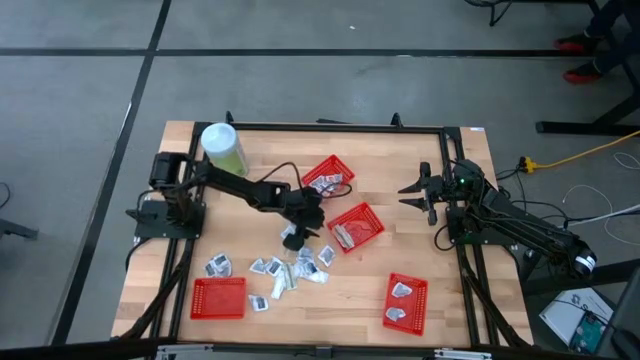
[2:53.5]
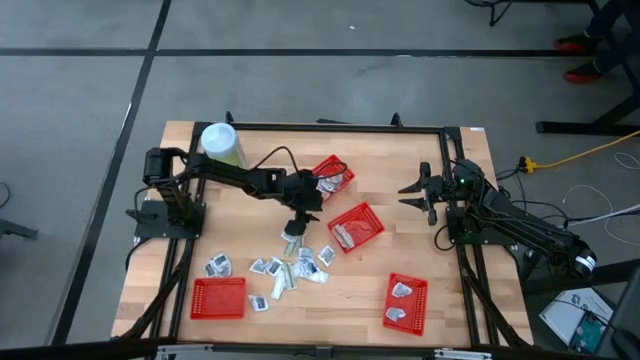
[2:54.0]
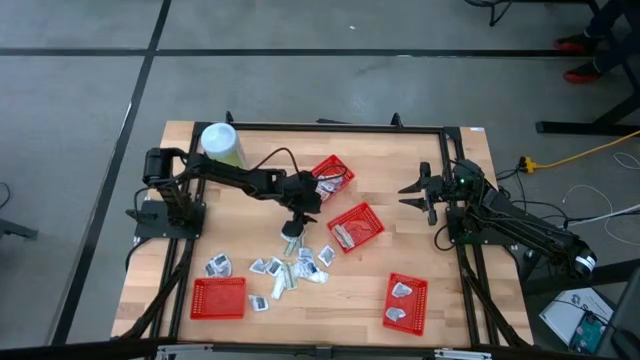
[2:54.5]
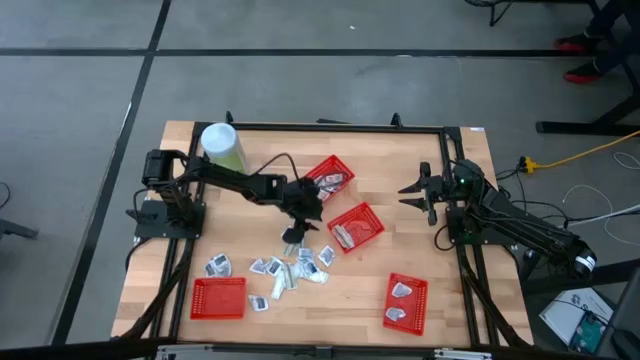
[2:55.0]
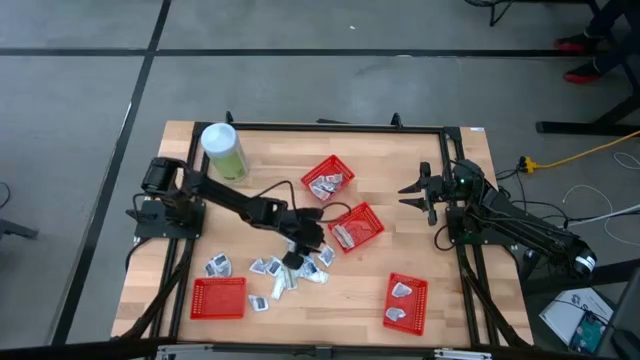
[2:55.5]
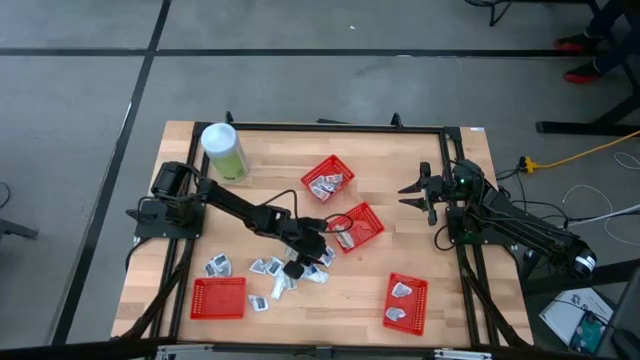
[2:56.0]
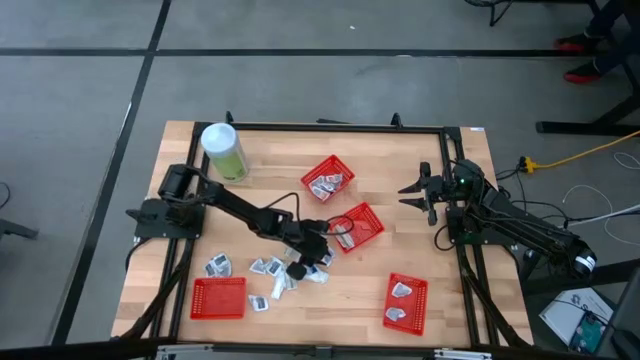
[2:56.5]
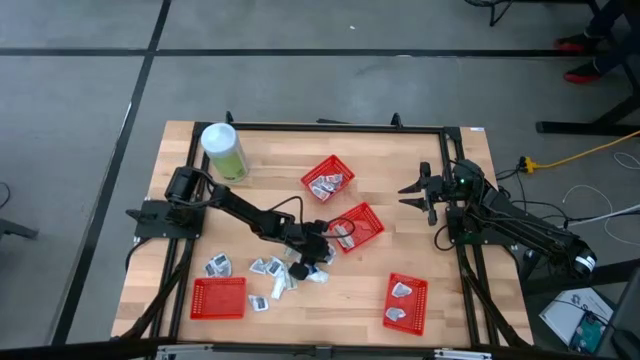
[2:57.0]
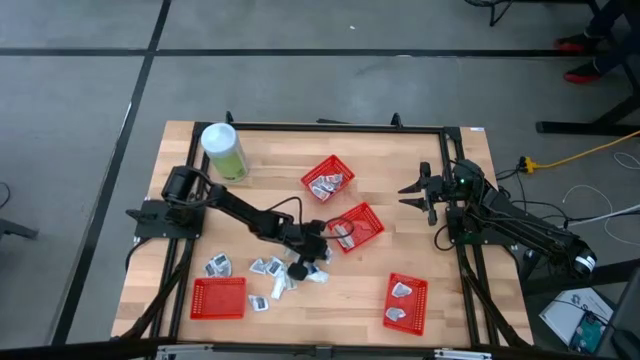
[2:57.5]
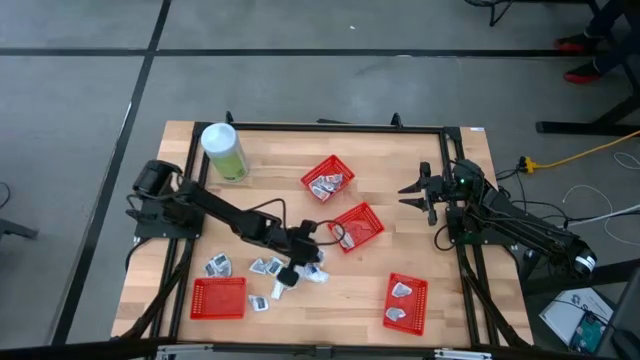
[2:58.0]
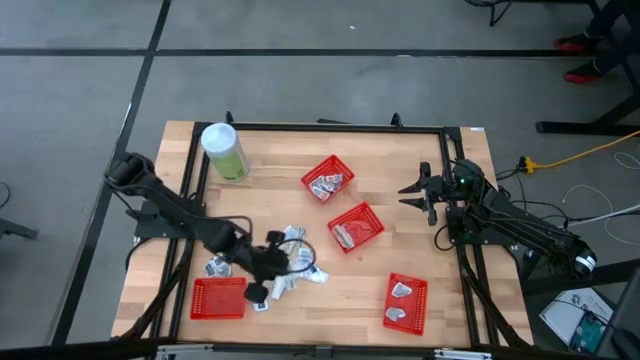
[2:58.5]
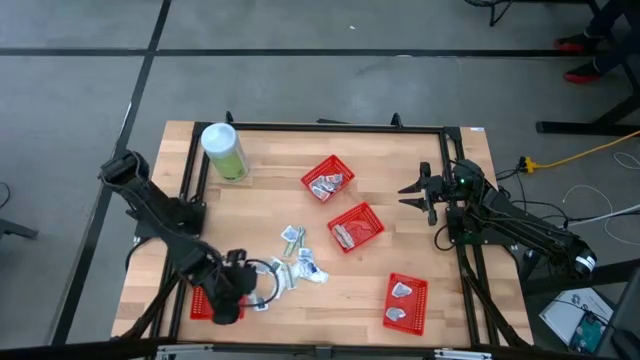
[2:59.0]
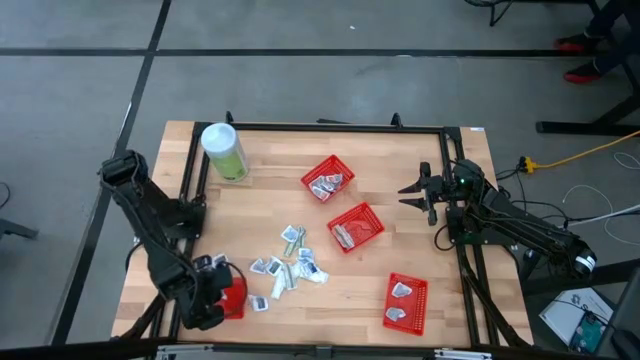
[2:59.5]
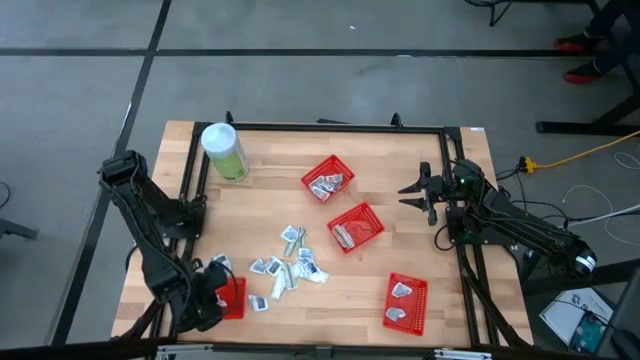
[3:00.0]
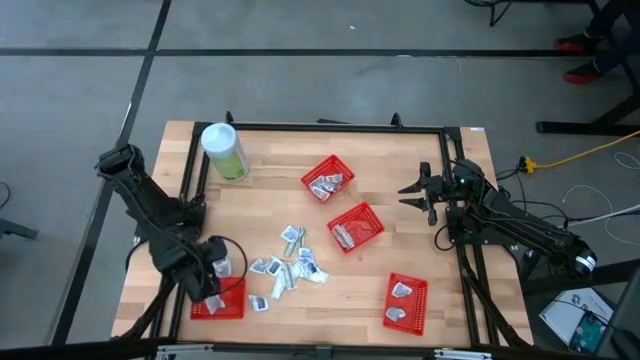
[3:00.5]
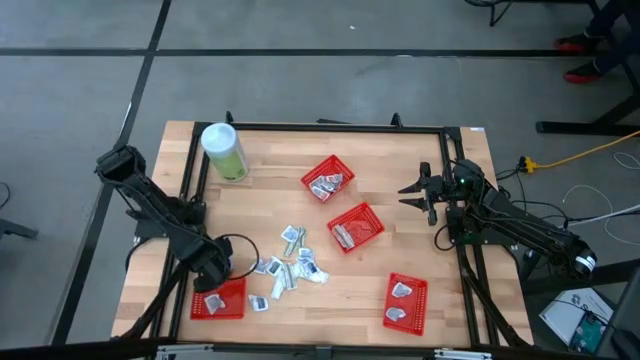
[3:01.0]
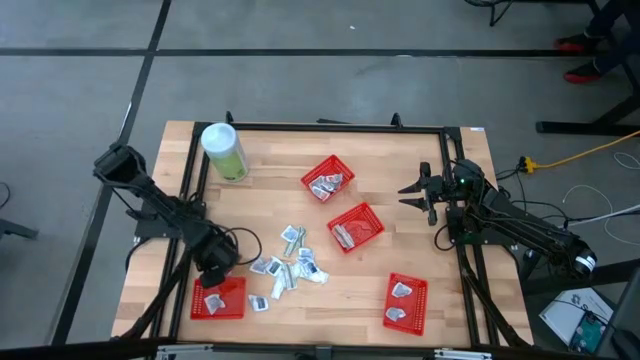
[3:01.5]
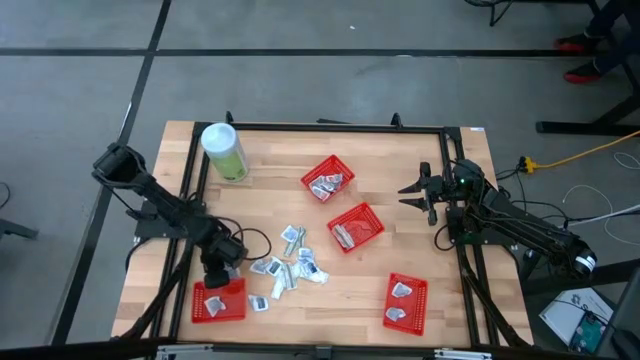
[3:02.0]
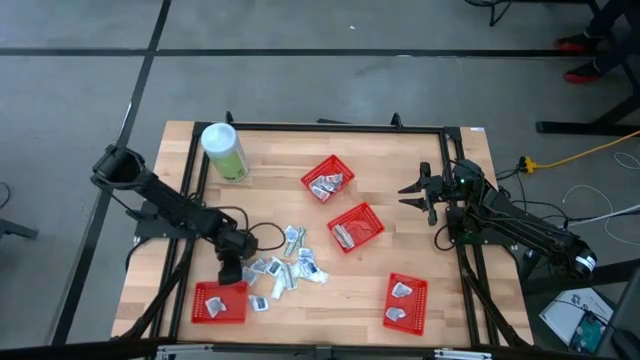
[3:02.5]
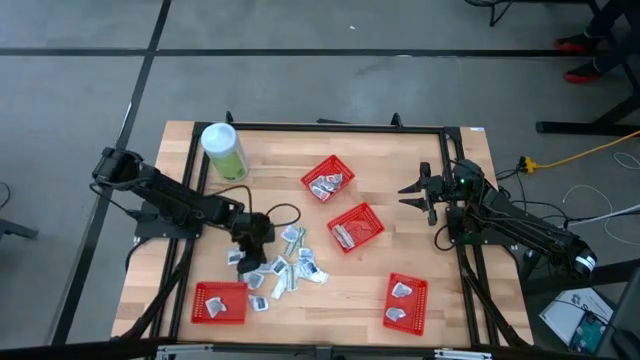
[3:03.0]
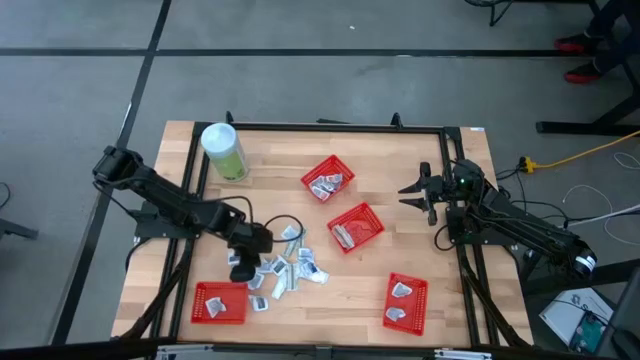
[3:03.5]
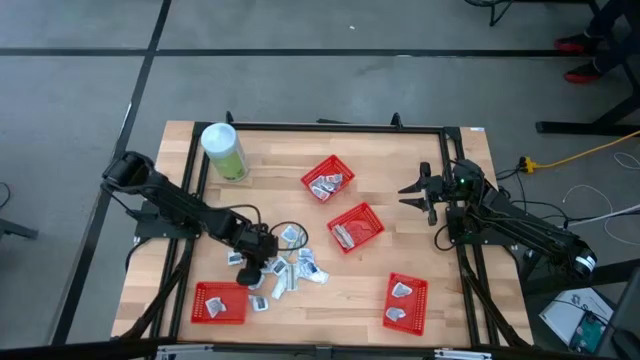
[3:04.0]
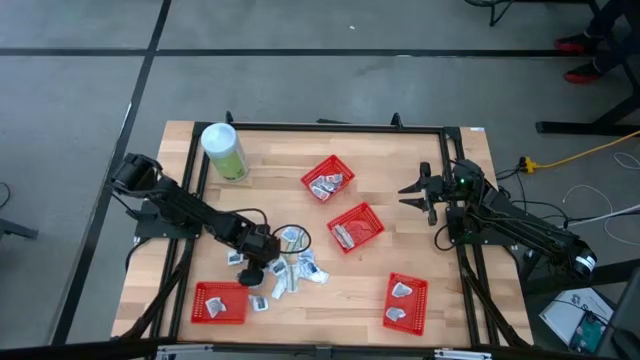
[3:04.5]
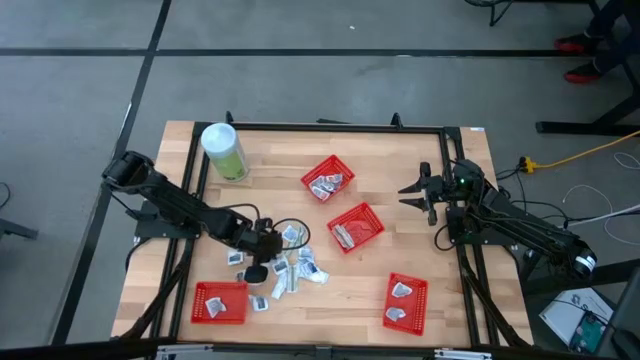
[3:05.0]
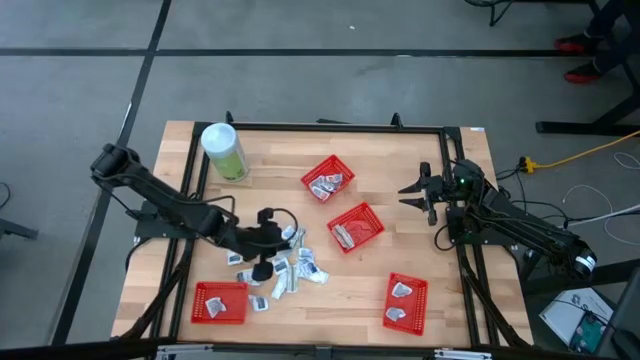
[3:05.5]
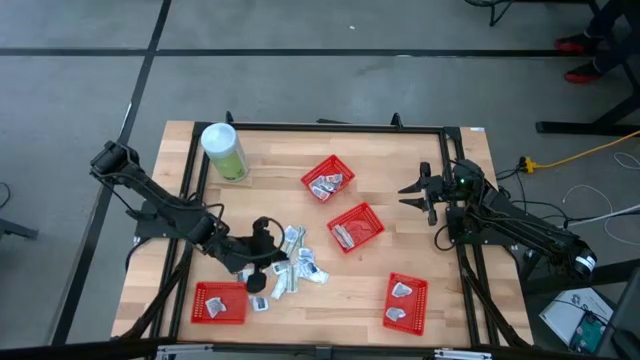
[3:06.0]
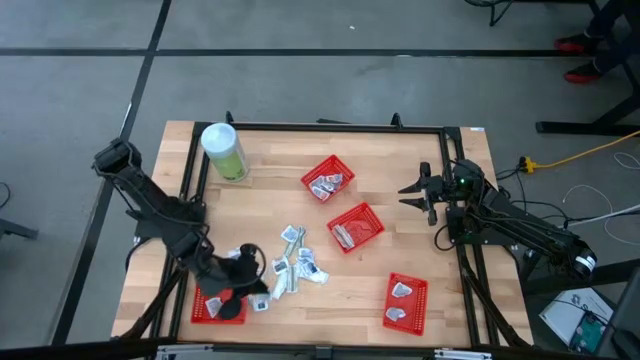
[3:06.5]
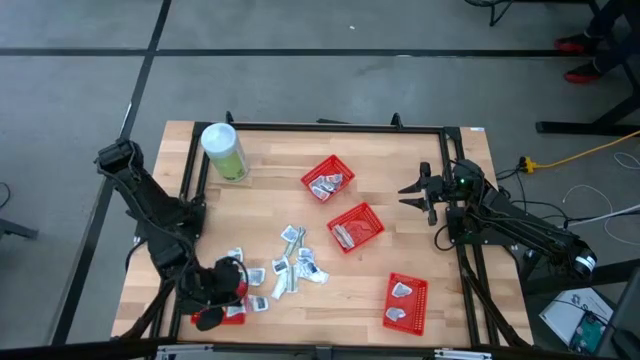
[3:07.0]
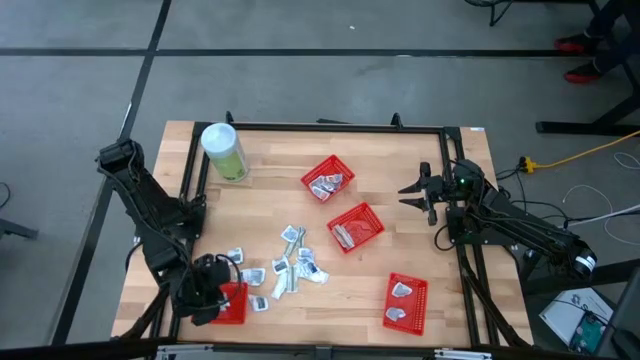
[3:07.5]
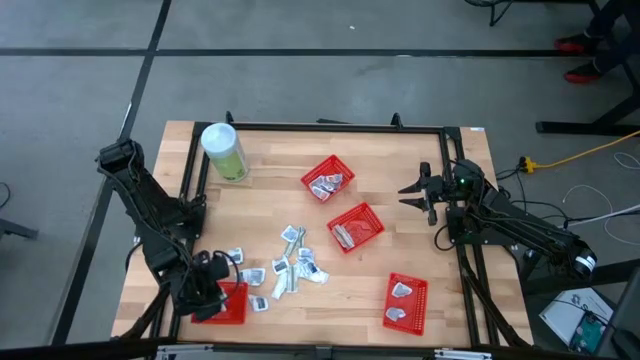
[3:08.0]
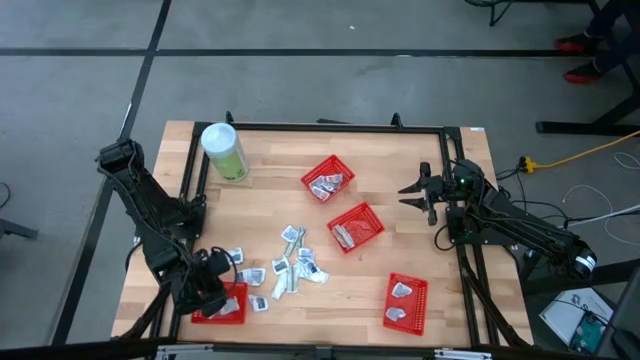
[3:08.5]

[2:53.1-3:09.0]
Task: Pick & Place First Aid Supplies
Put the gray towelette pad into the red container

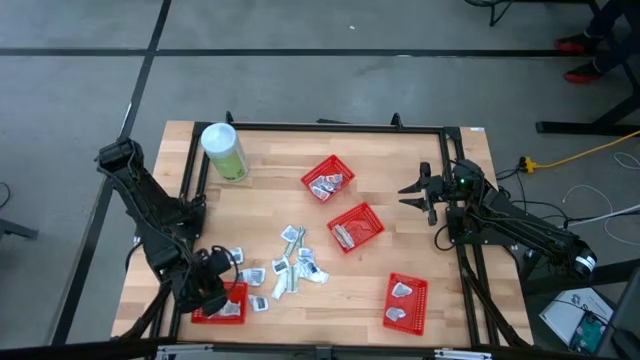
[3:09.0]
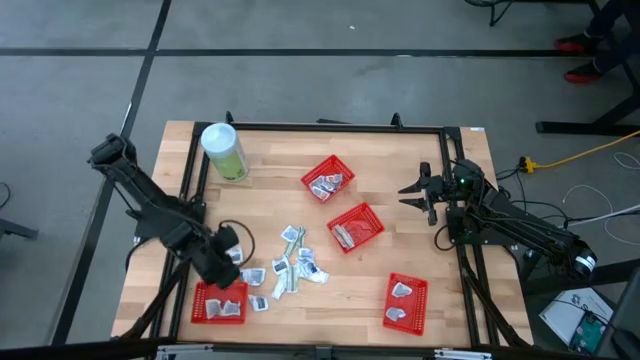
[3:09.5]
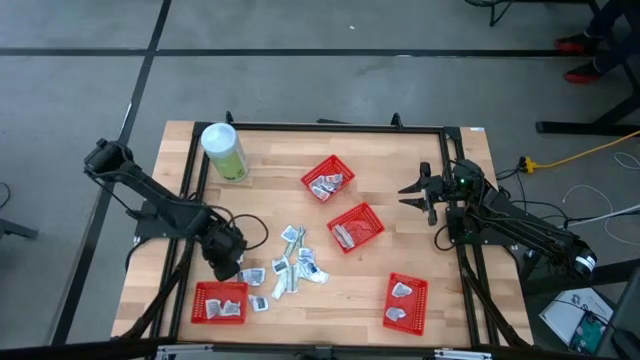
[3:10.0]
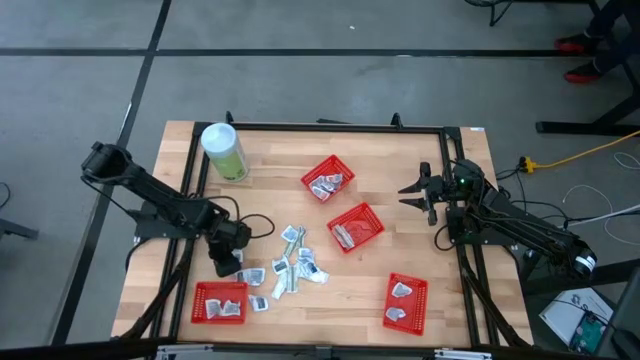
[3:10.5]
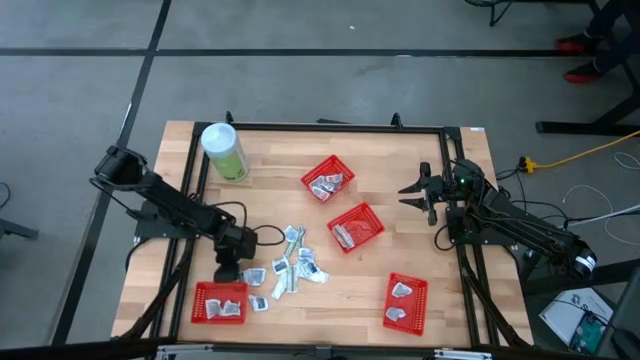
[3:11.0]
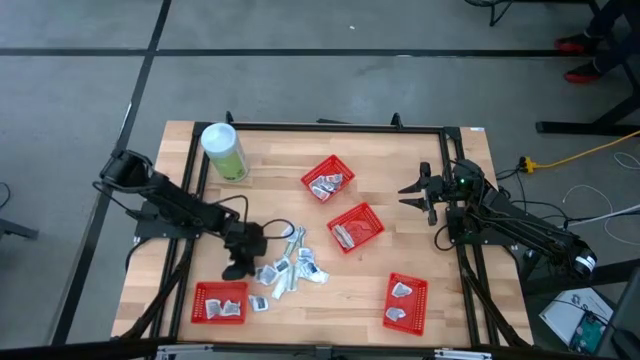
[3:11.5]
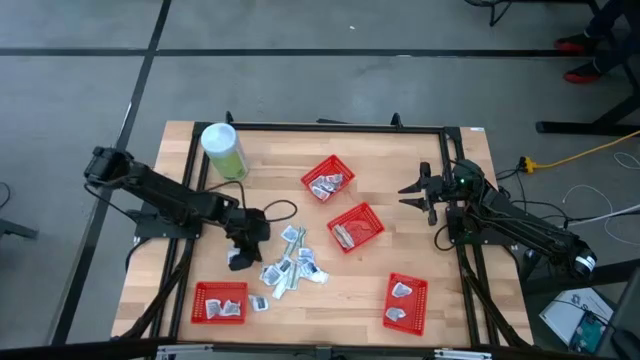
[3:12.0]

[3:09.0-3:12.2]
Adjust the gray towelette pad

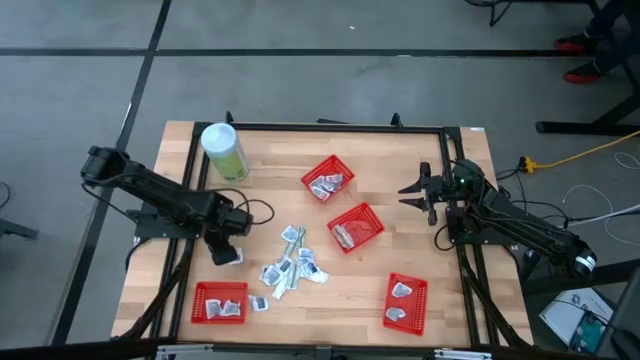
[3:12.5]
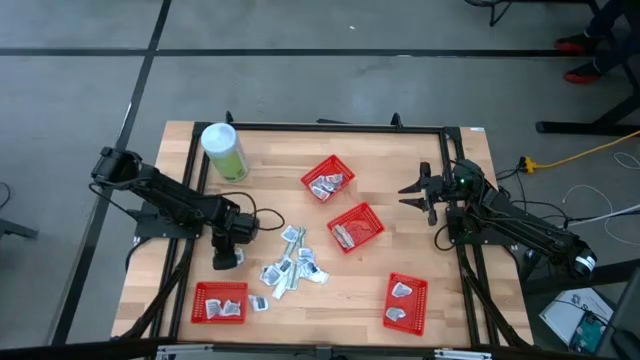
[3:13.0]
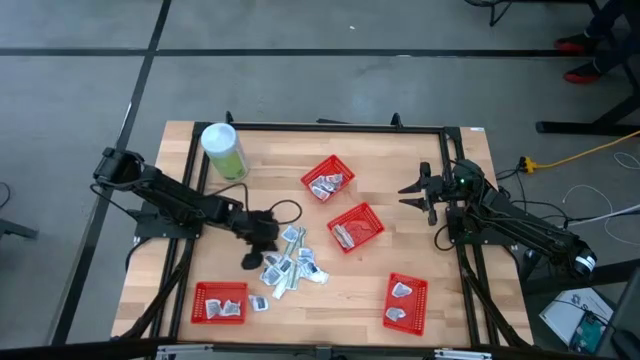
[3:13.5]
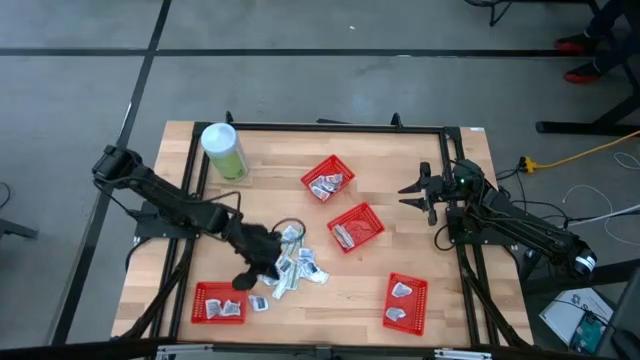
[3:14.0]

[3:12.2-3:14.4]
Adjust the gray towelette pad

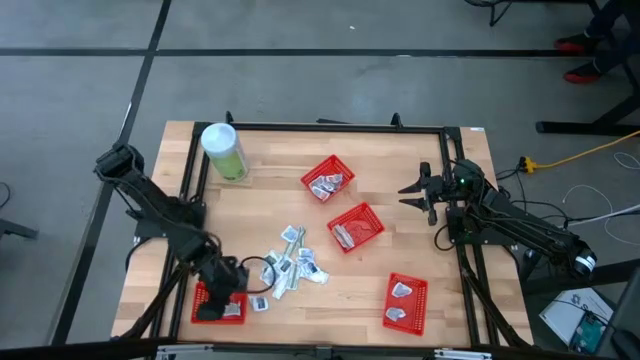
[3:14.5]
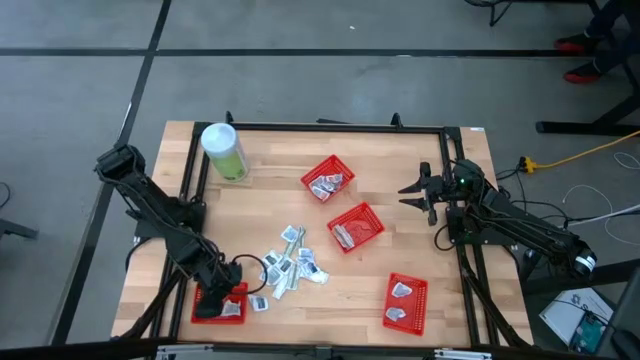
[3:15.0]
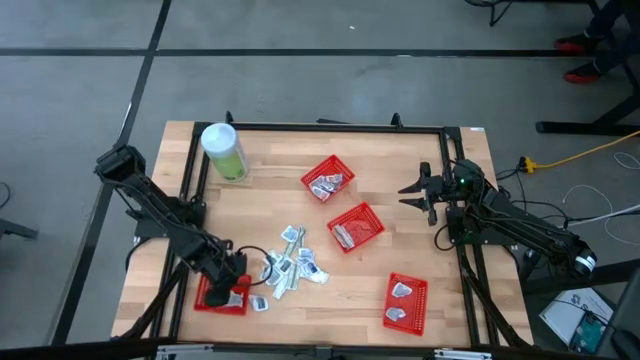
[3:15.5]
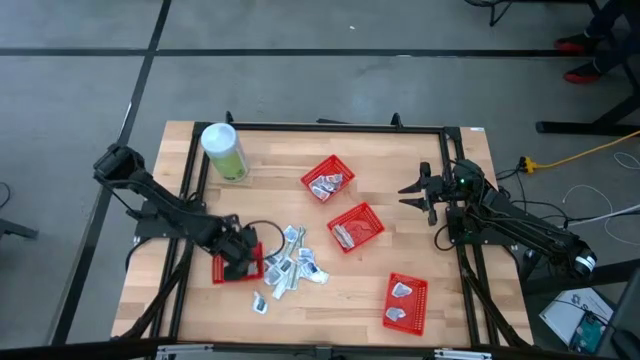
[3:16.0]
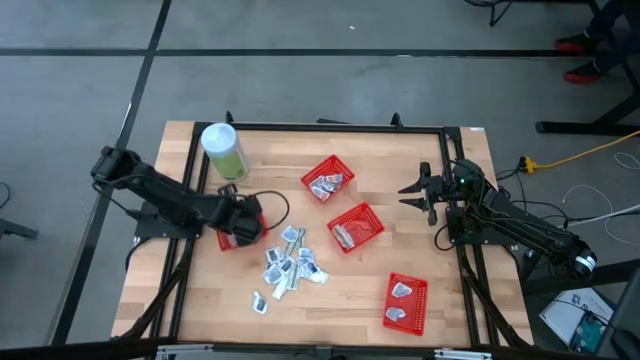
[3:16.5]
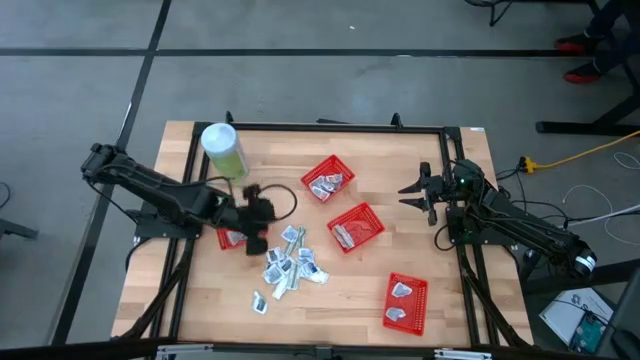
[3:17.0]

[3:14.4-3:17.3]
Adjust the red container
